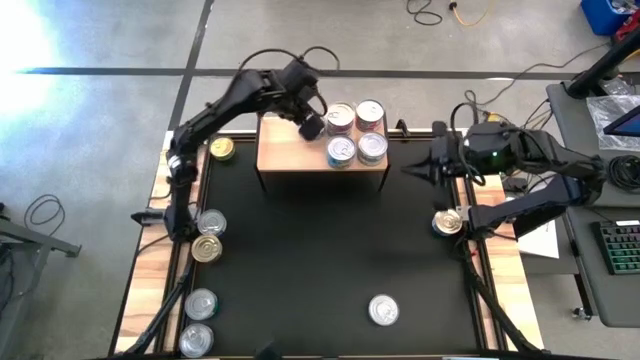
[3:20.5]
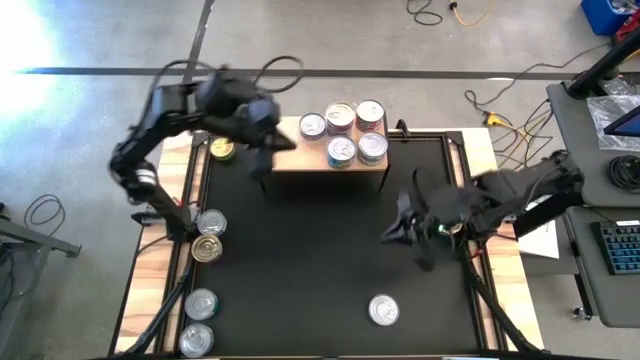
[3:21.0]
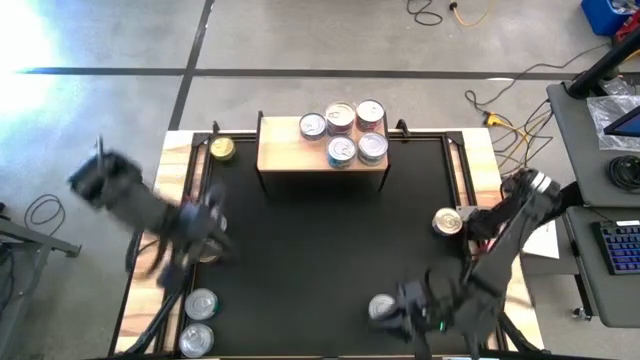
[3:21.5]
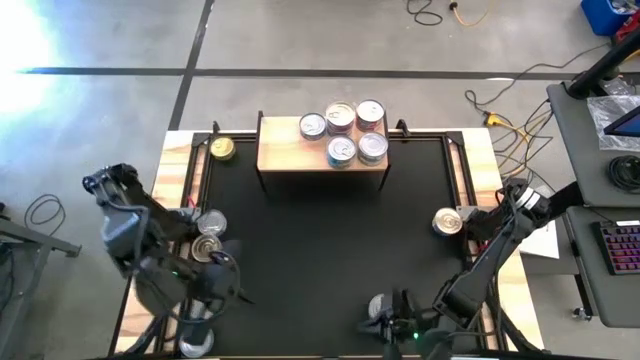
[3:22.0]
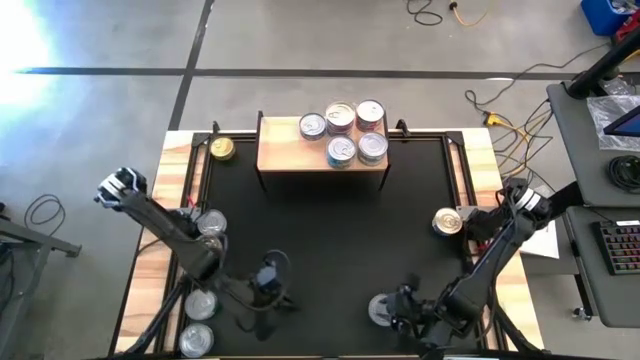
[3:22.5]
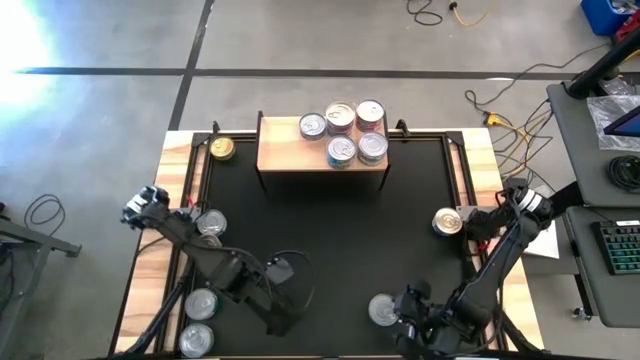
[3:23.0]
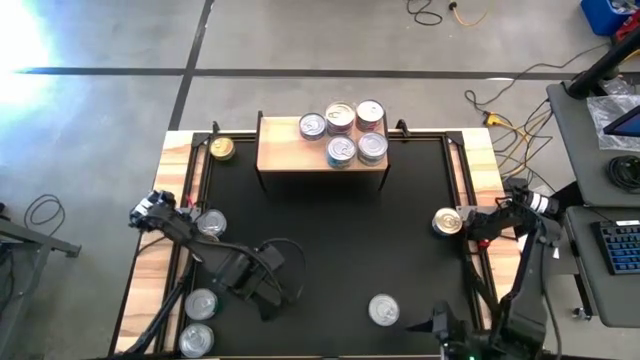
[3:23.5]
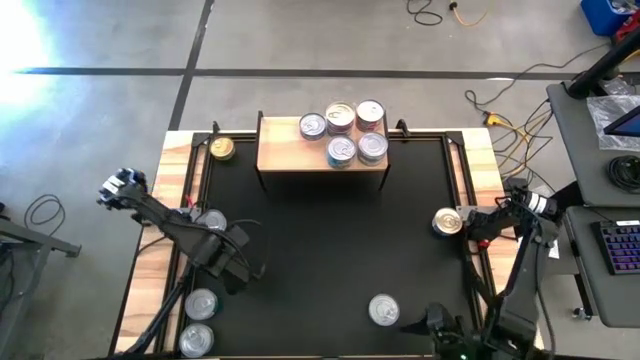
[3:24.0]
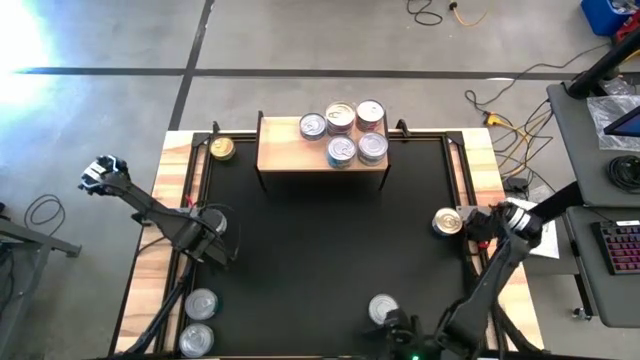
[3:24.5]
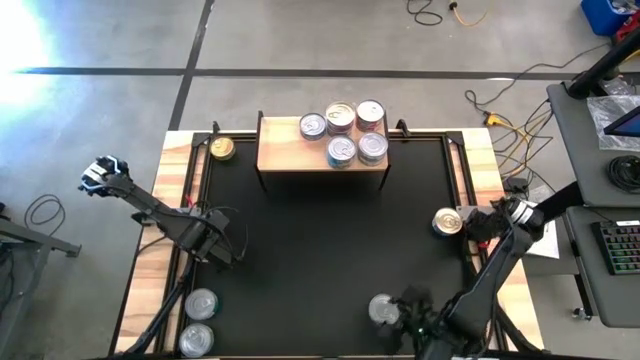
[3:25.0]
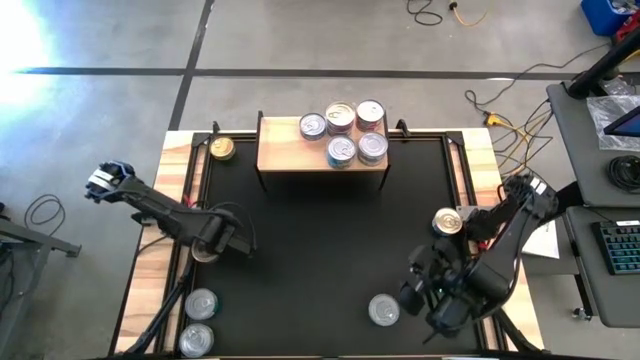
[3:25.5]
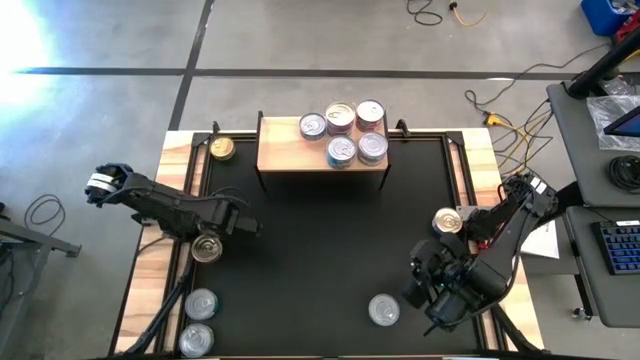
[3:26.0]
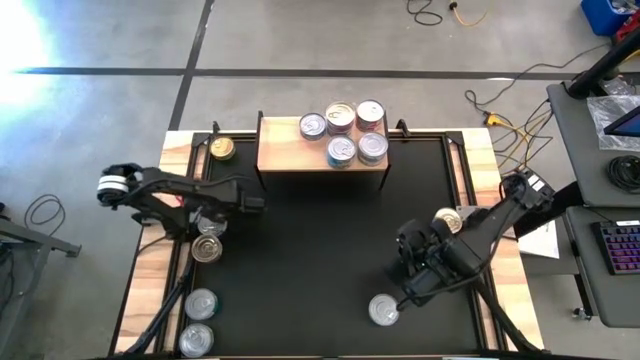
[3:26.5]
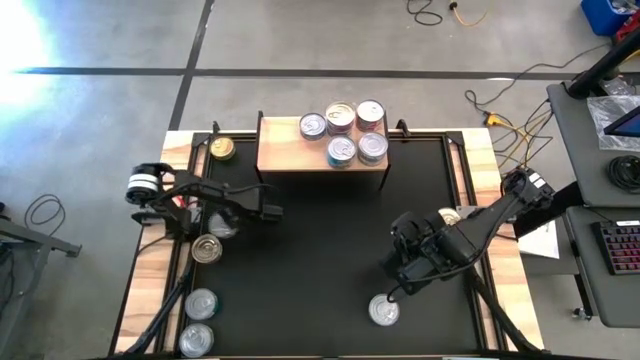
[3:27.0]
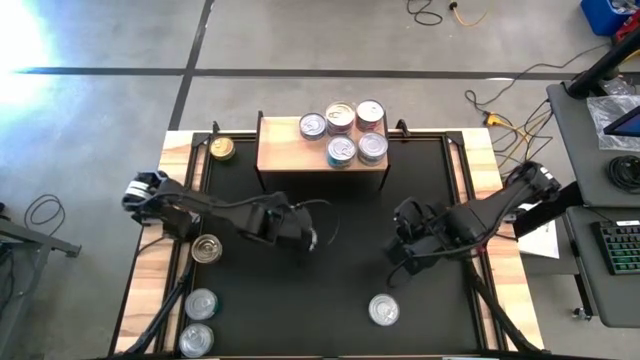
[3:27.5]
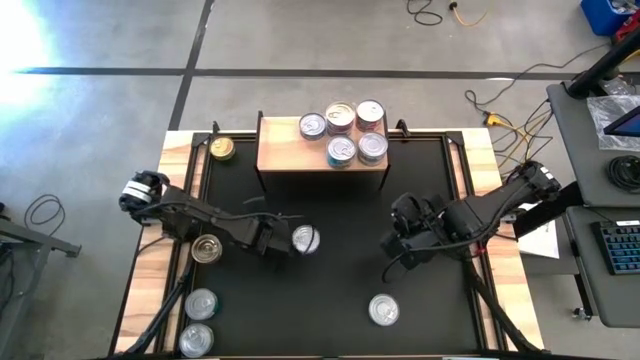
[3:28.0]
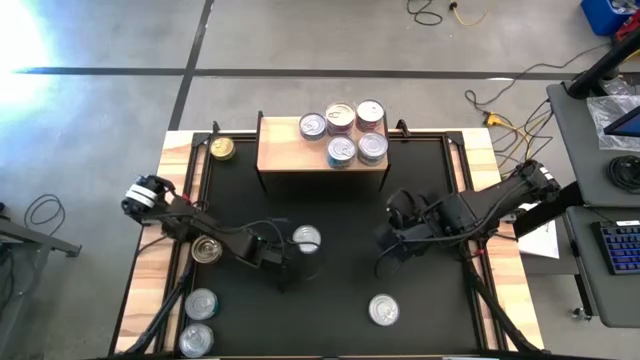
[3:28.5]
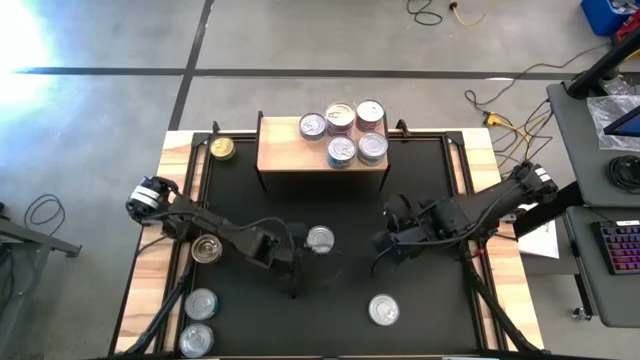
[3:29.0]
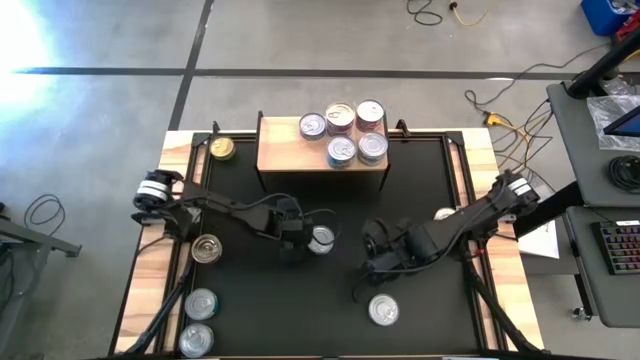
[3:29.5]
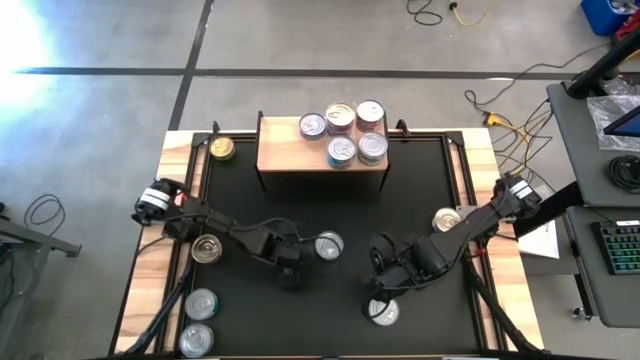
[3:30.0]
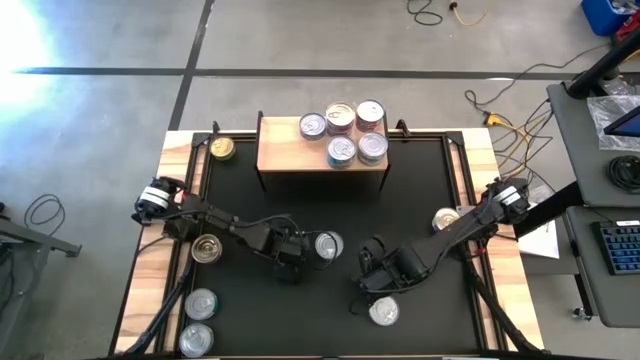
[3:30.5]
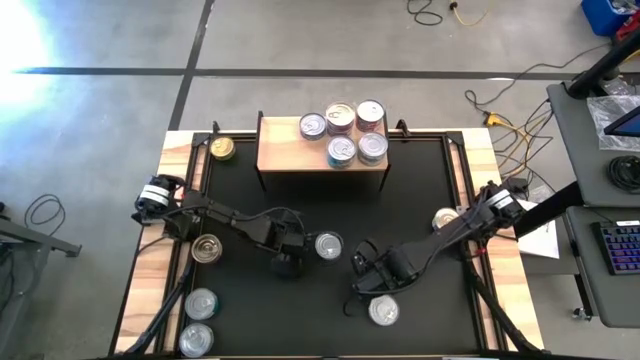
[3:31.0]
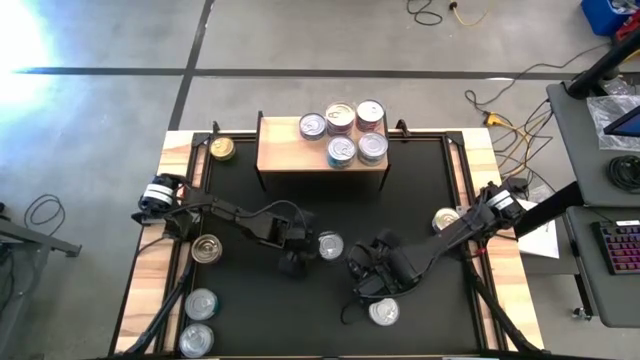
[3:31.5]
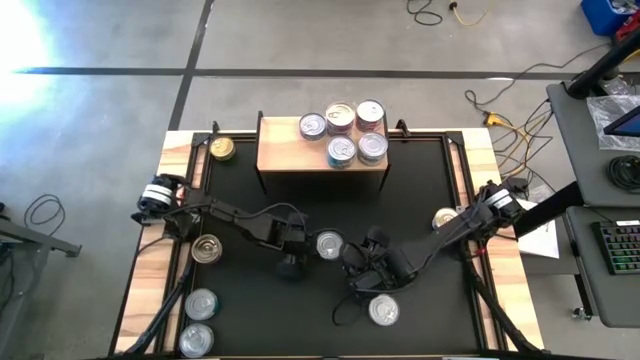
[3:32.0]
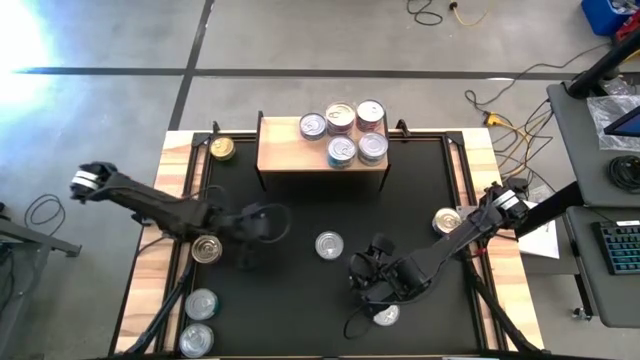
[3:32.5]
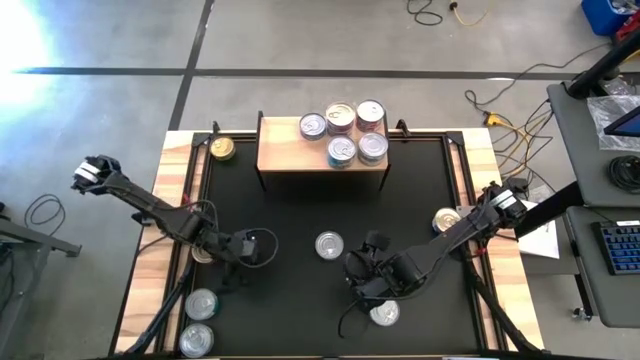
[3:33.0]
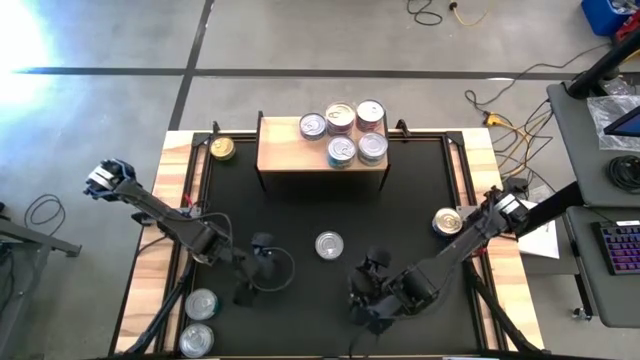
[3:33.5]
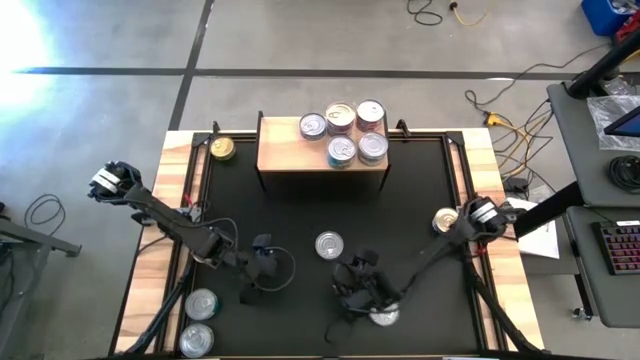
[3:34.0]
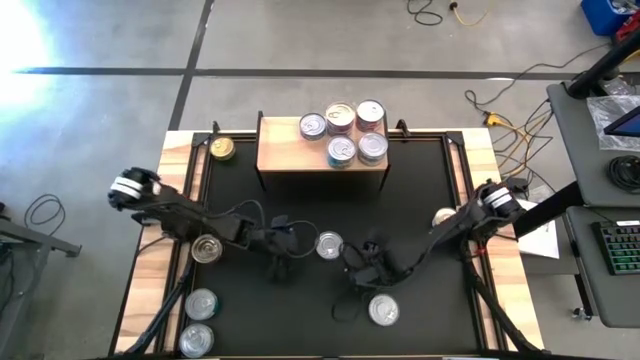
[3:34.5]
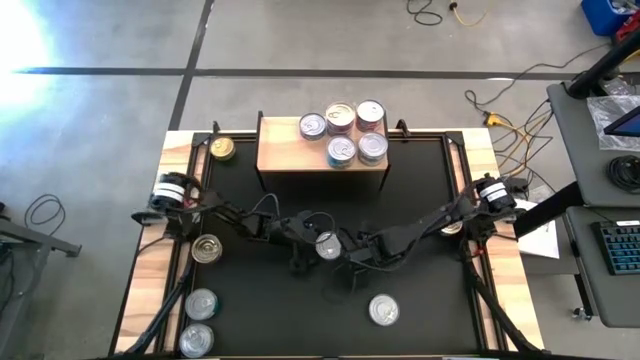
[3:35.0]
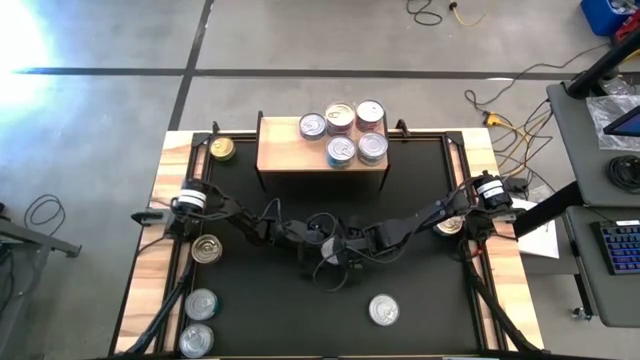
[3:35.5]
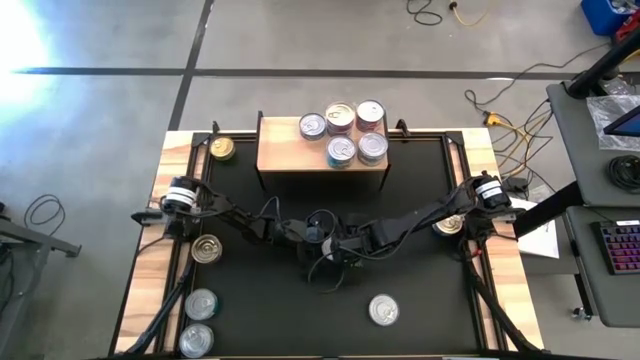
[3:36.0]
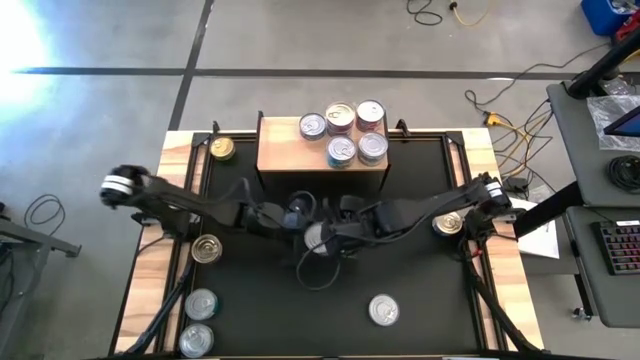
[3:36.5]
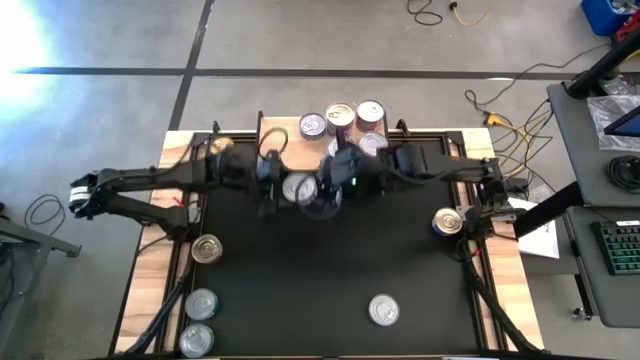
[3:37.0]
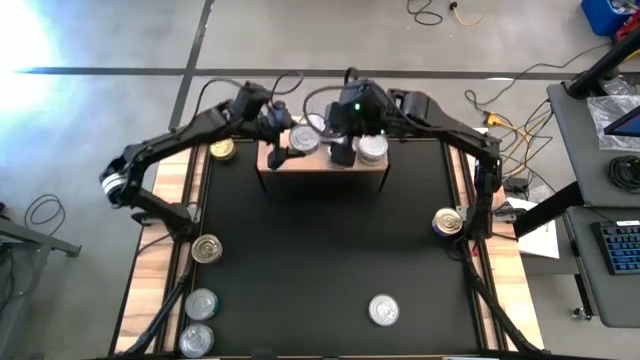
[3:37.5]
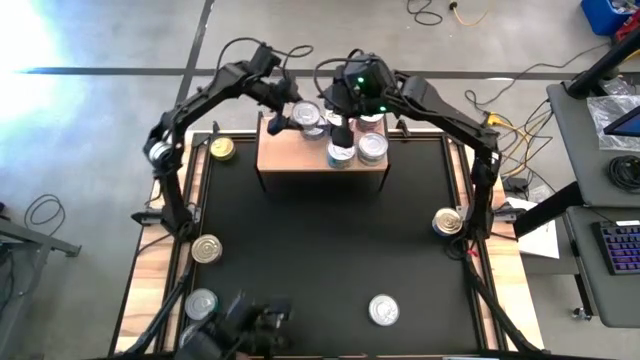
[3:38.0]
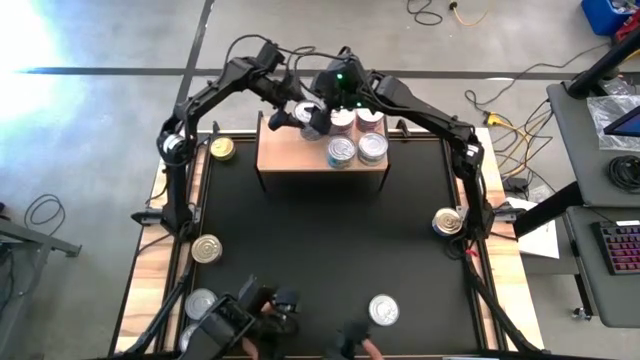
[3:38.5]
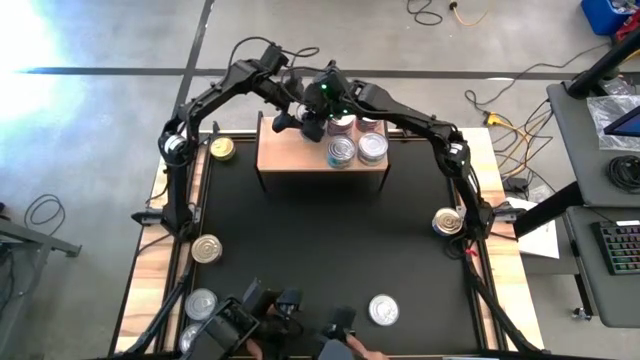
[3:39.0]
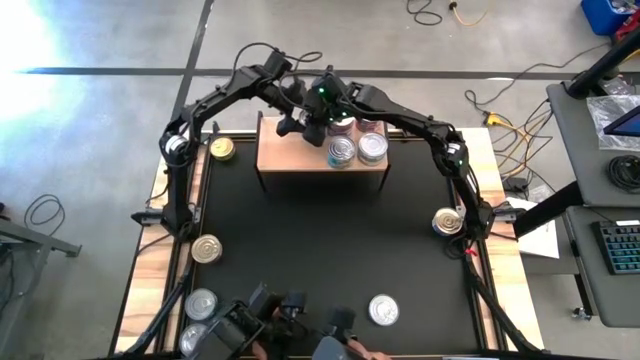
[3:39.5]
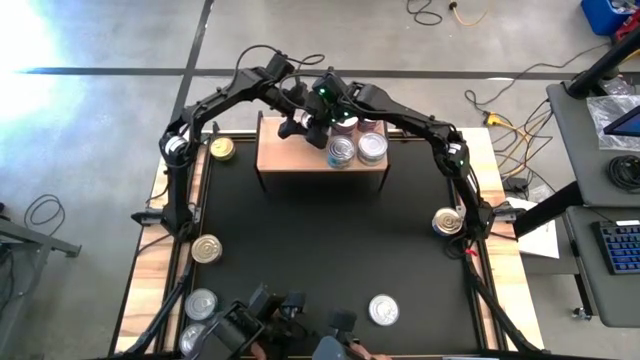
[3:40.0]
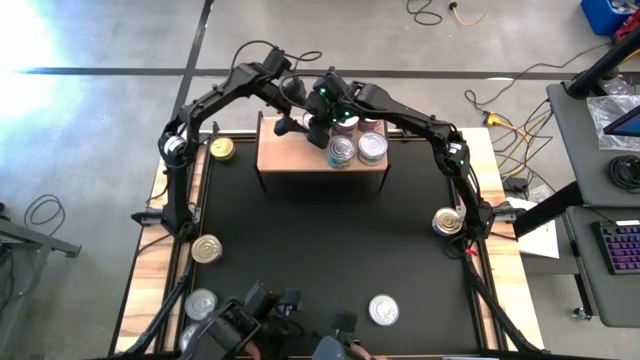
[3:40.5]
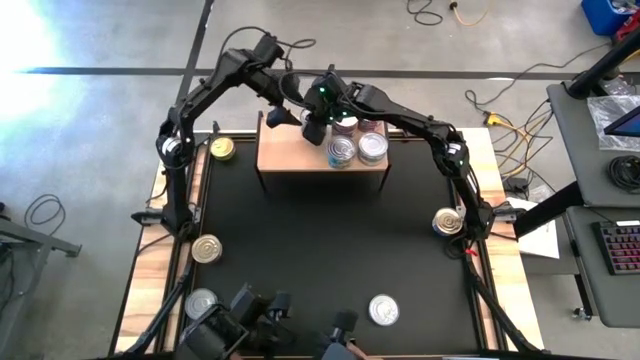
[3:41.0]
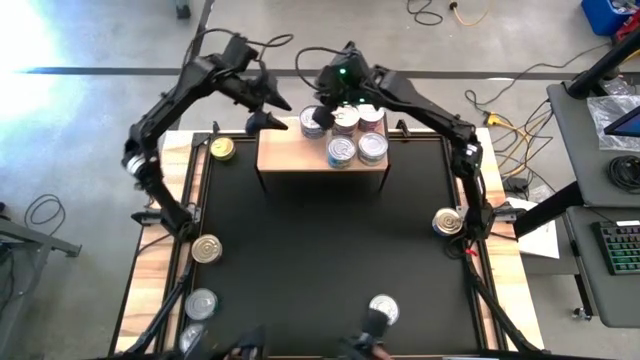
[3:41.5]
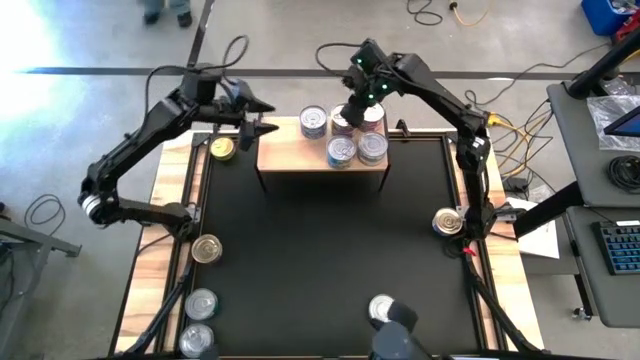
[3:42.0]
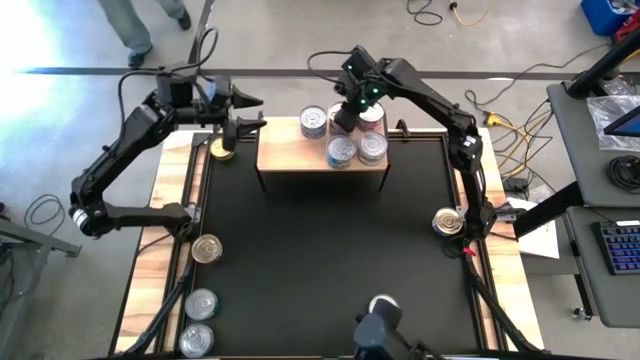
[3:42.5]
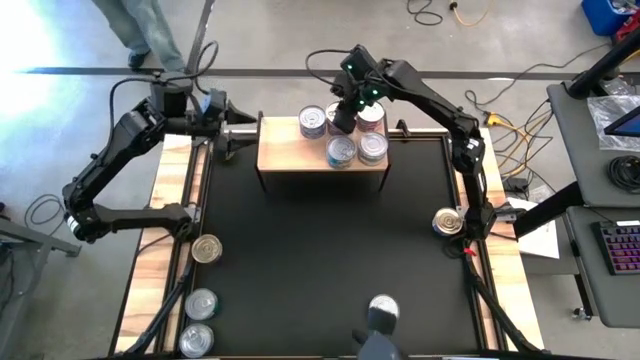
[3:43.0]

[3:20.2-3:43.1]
Task: Stack canned seafood by type on shelf
Stack the blue tuna can on top of the other blue tuna can on the shelf
